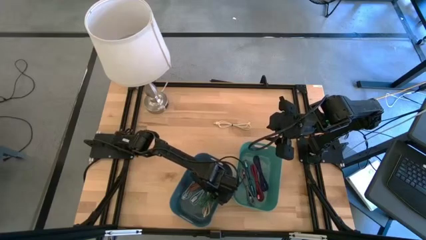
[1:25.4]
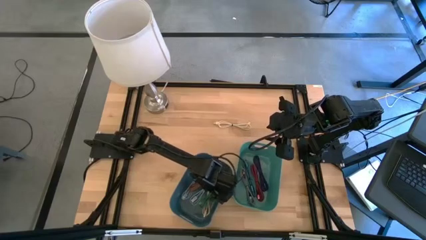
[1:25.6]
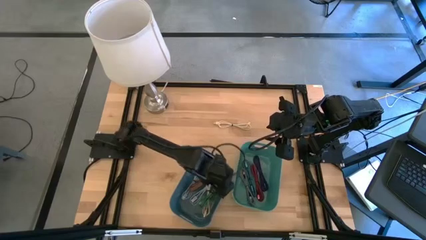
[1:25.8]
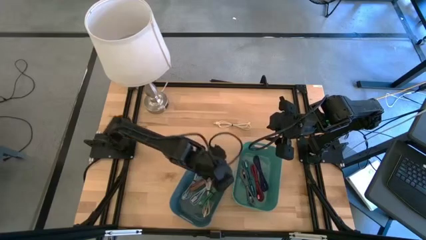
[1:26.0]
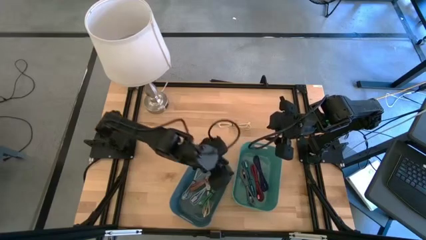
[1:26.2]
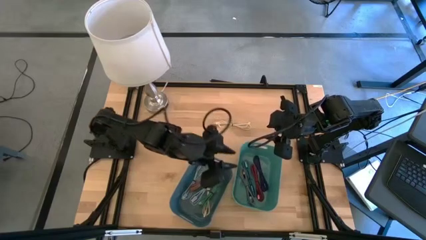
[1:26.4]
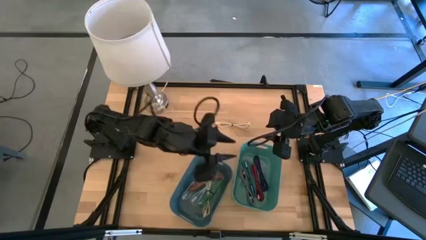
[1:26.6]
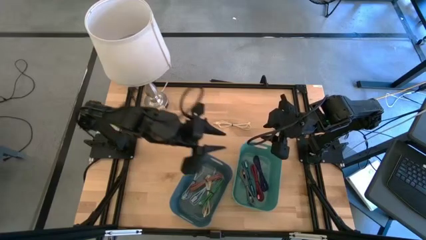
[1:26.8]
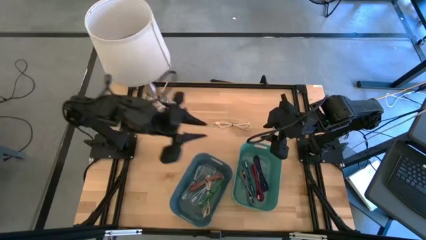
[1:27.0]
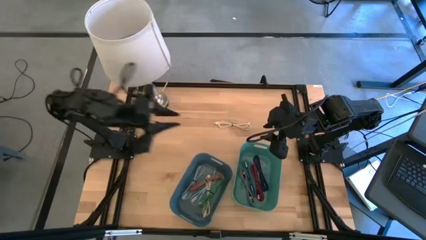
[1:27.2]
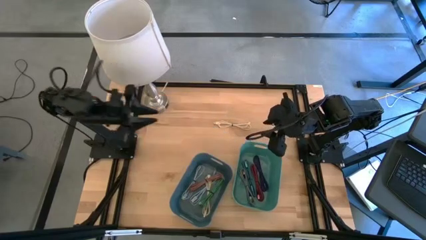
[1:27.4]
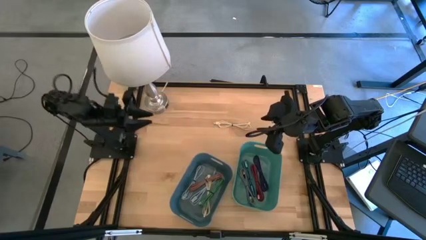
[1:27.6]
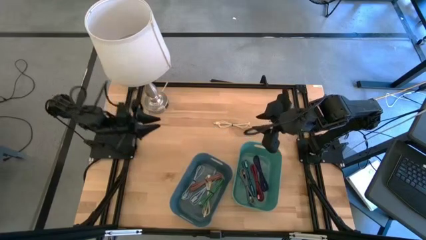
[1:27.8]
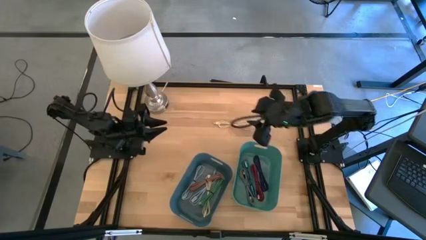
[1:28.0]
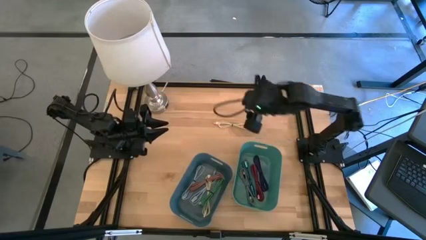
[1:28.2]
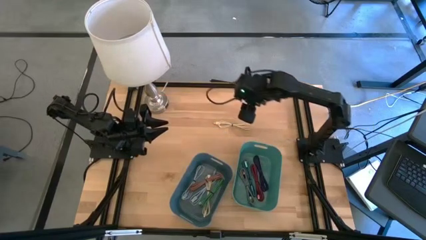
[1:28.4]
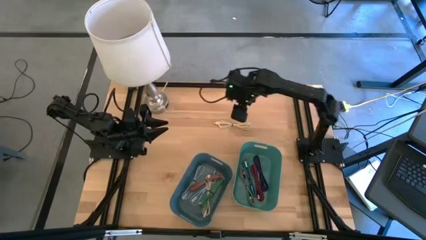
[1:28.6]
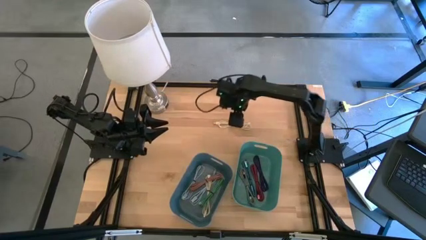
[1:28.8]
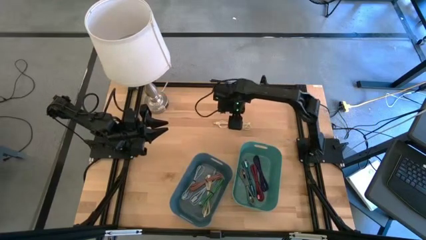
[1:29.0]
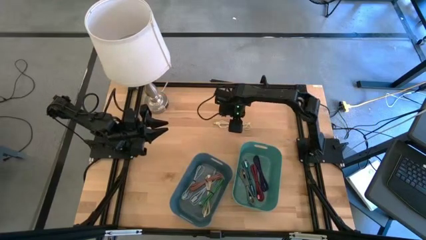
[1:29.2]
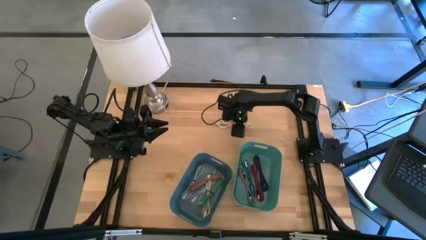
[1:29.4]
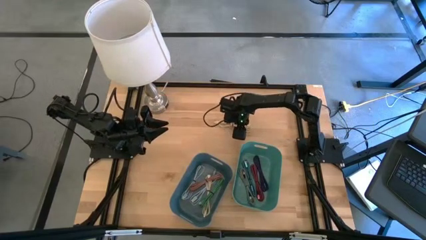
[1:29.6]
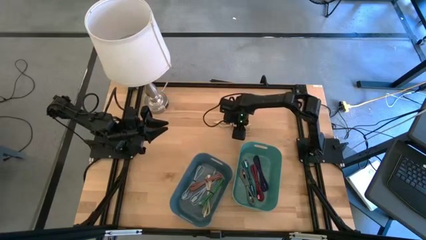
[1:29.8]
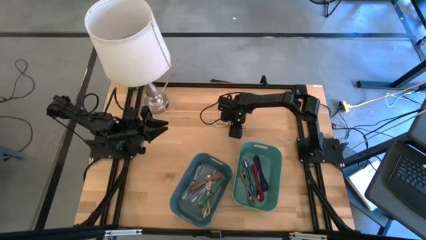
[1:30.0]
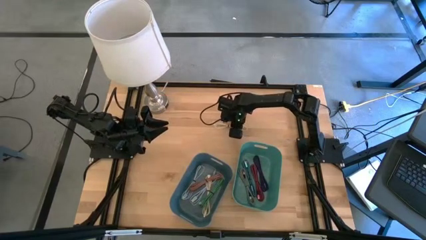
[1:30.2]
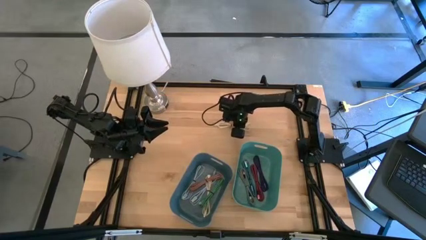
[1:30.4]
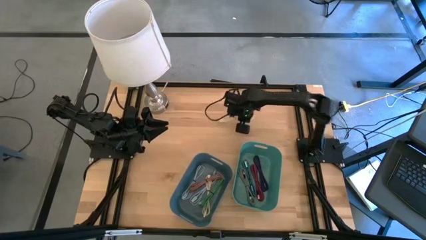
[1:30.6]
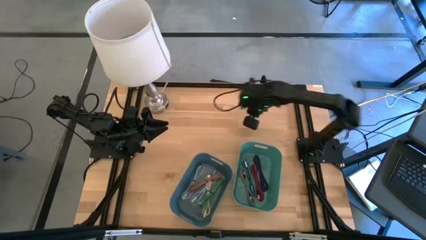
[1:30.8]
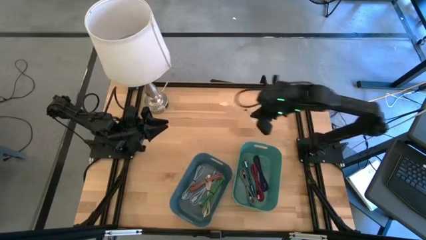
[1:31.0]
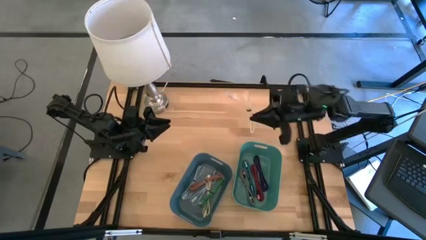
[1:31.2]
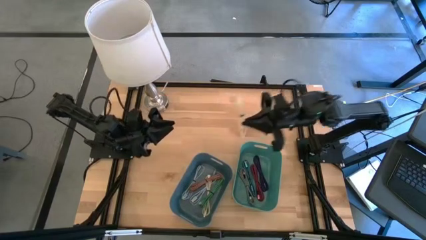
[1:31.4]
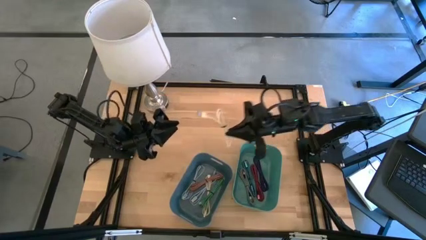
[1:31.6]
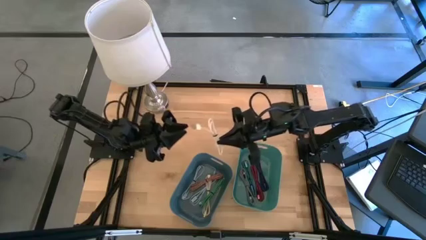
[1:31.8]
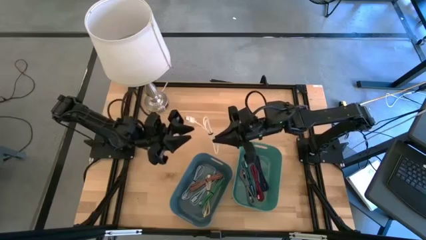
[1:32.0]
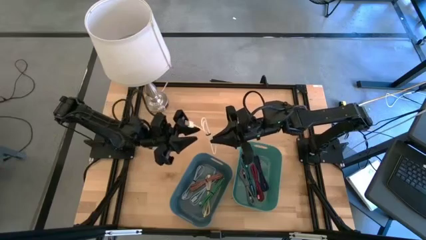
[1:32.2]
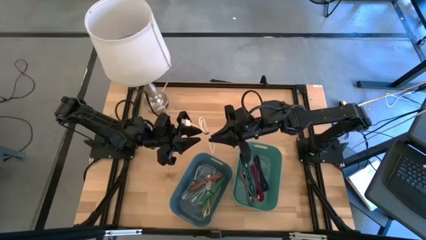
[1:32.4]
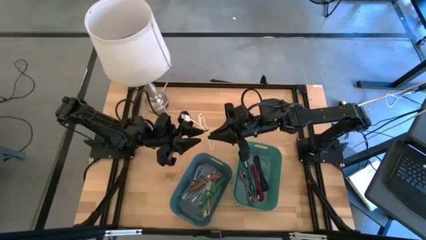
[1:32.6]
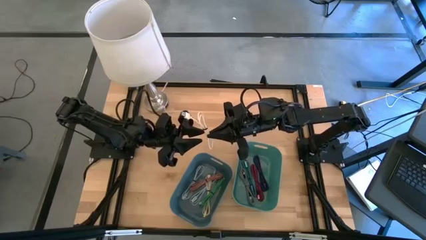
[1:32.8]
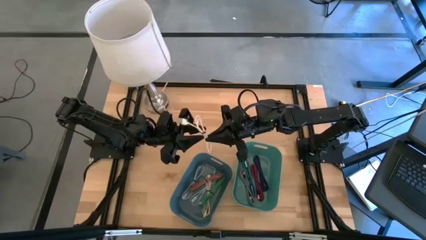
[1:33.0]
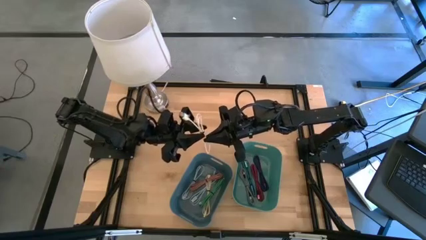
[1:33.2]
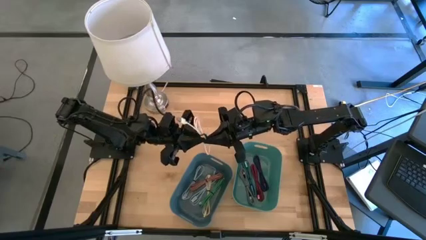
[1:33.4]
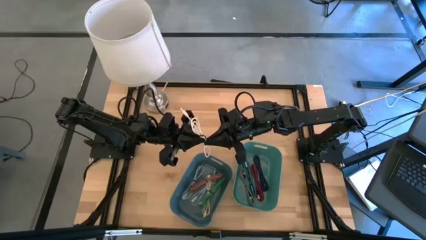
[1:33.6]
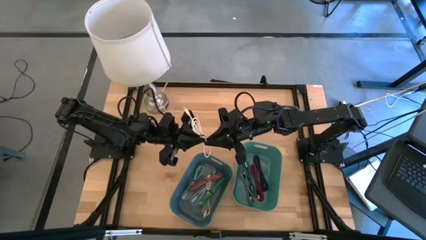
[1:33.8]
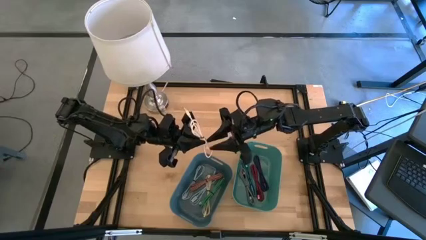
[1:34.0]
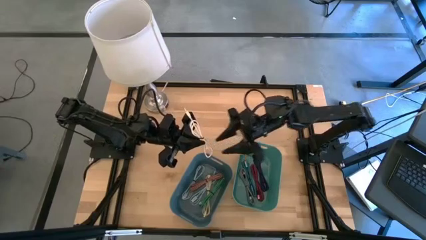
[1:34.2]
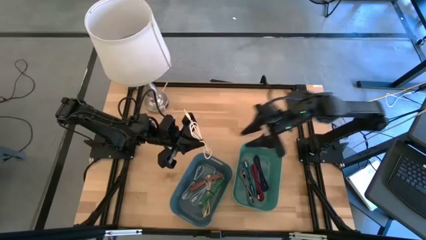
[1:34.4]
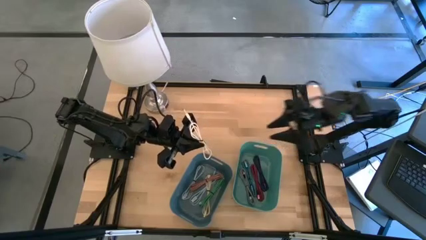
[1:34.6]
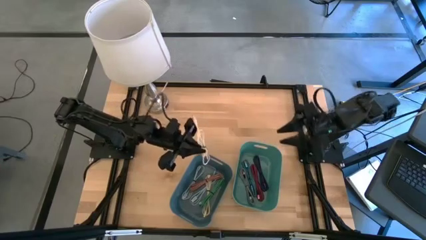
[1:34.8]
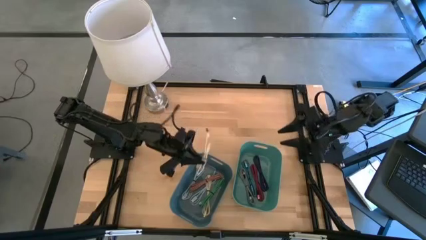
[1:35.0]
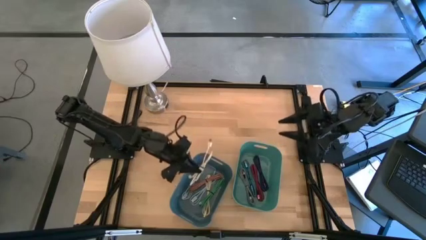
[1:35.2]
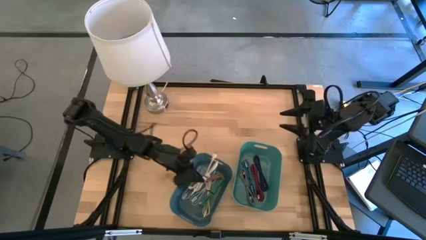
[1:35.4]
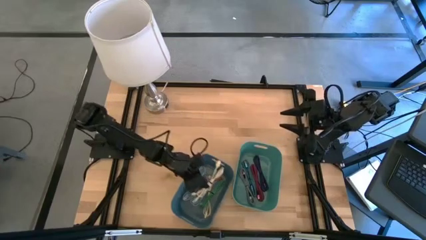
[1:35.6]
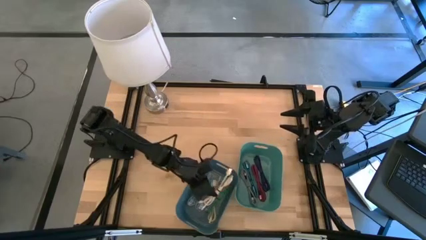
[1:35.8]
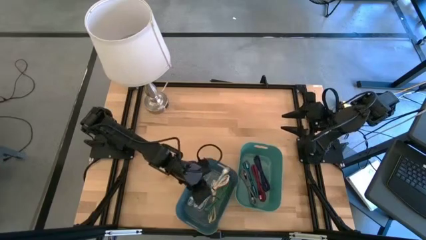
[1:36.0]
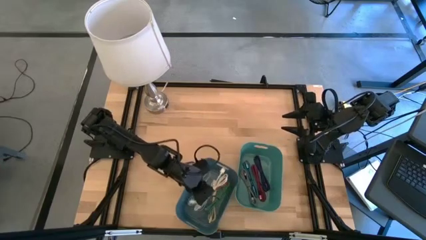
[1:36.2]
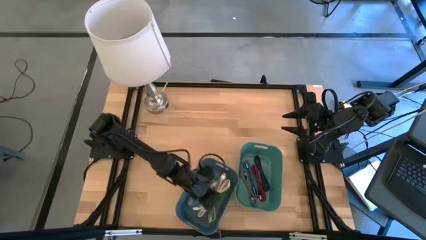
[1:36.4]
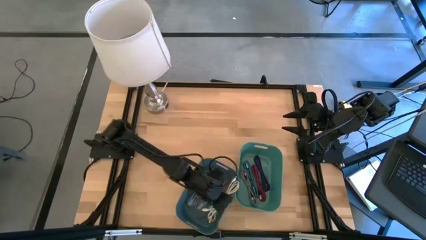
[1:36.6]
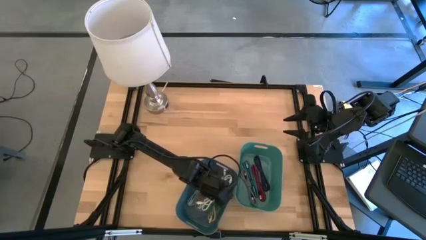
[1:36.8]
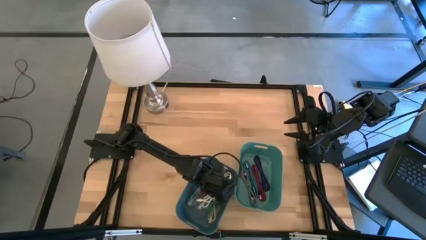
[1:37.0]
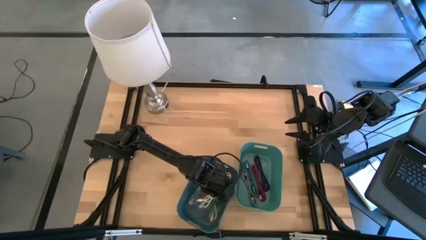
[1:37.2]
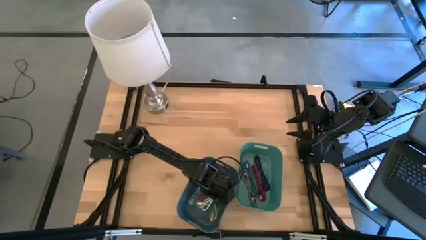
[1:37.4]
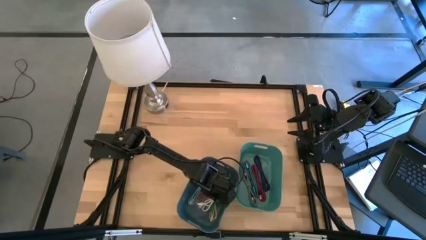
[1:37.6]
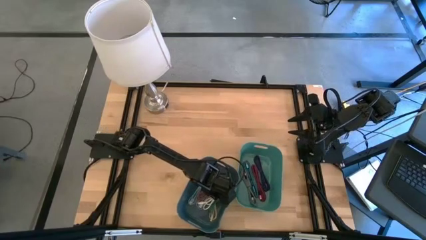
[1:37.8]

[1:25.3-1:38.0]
Put the white charger cable into the blue container

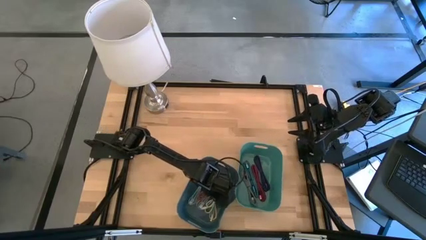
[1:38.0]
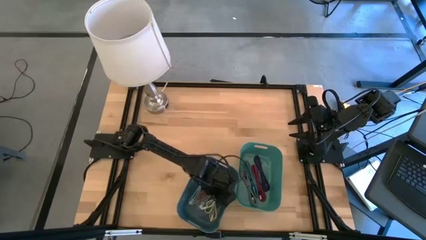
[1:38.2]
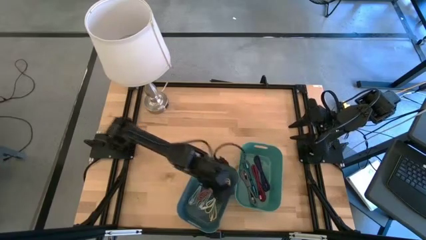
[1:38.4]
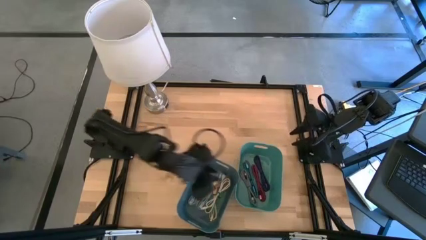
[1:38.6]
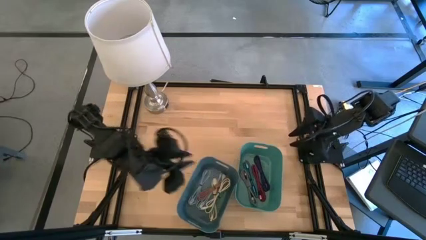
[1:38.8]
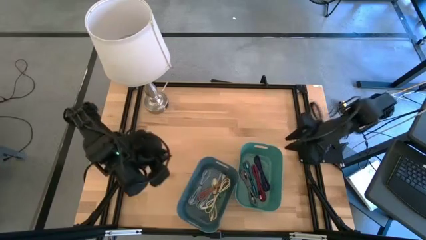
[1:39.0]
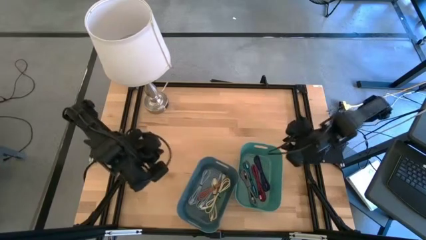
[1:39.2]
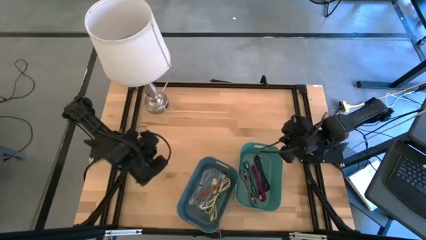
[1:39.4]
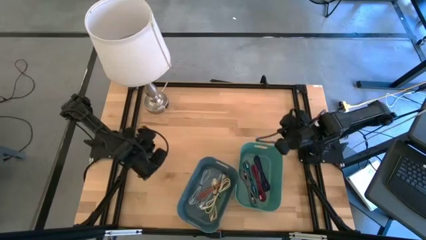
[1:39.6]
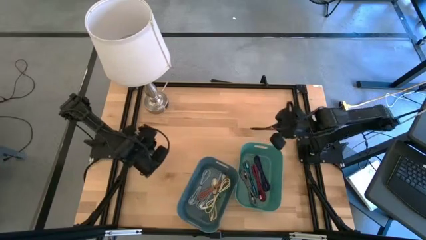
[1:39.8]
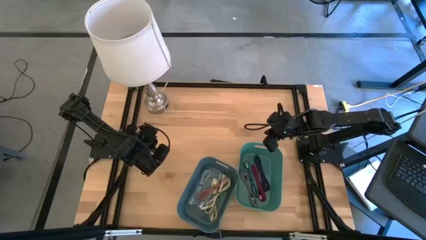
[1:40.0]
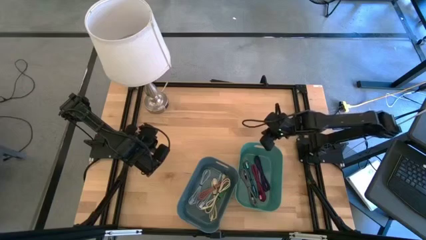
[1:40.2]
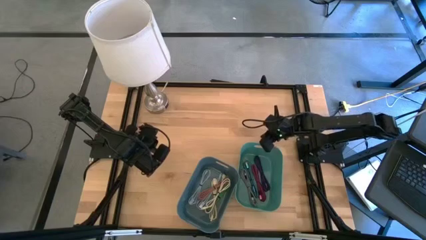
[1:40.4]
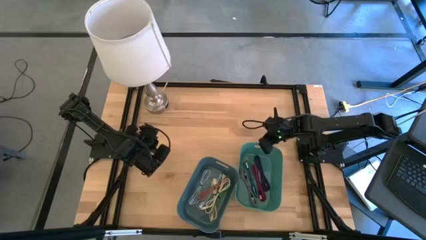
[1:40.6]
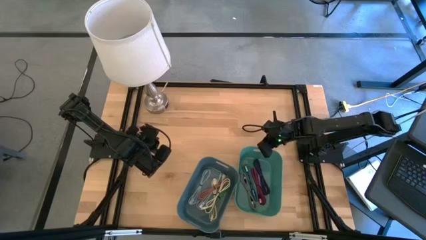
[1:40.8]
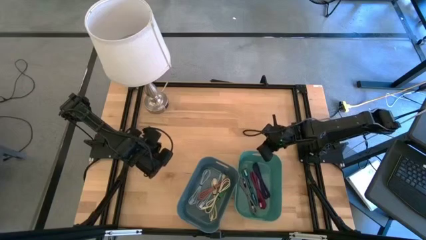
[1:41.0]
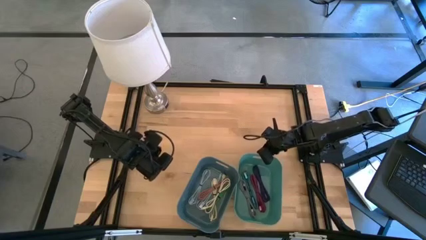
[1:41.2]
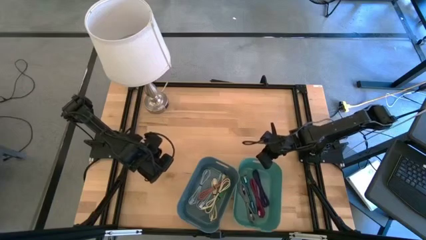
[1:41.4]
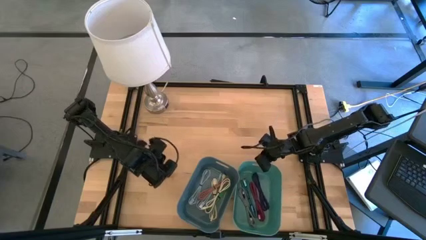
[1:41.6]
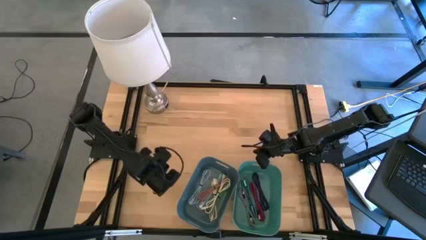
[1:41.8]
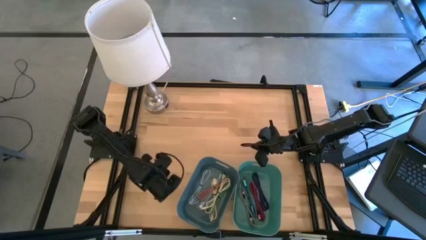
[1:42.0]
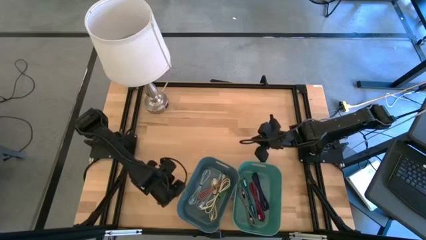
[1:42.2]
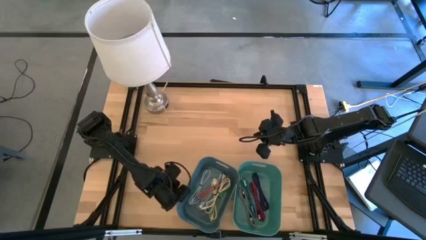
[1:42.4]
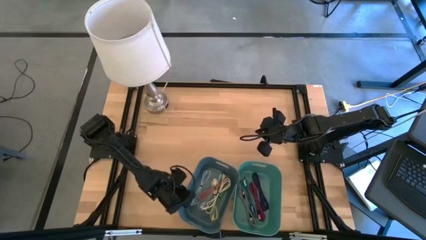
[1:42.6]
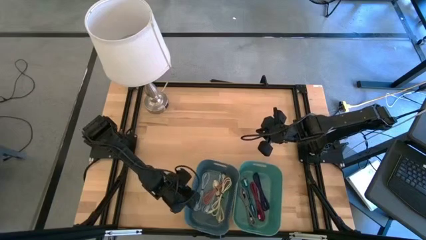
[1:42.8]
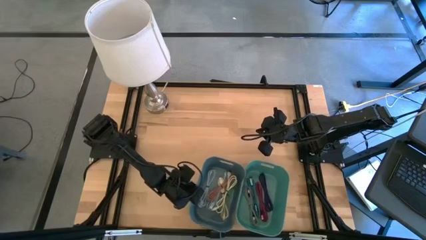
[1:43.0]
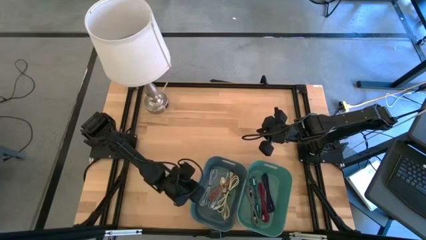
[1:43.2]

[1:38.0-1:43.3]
Adjust the bins
